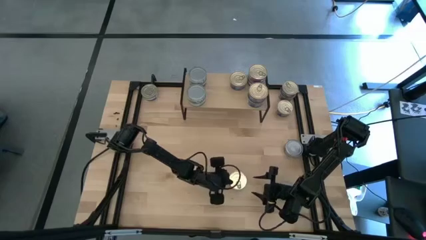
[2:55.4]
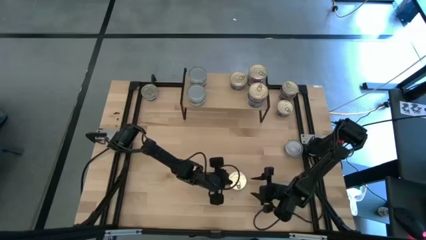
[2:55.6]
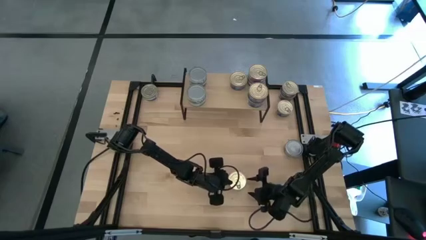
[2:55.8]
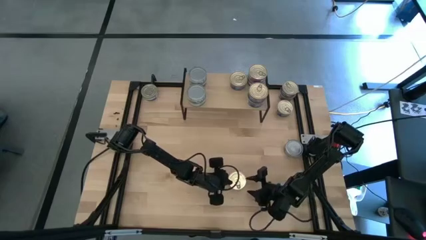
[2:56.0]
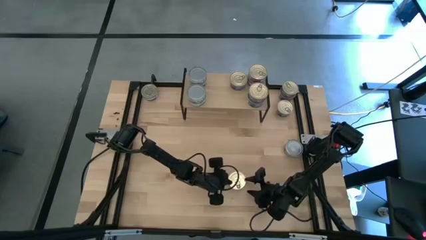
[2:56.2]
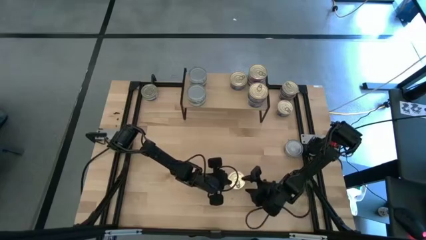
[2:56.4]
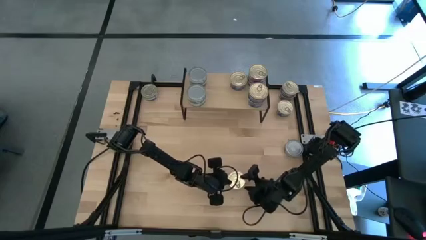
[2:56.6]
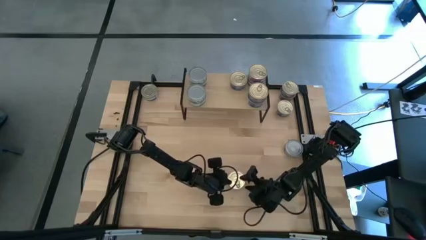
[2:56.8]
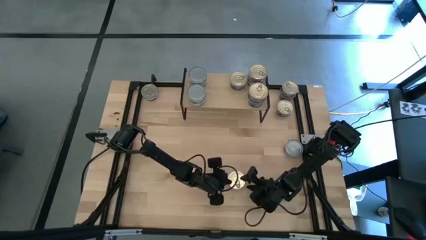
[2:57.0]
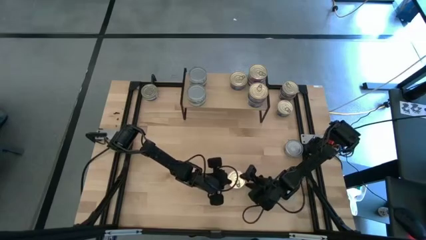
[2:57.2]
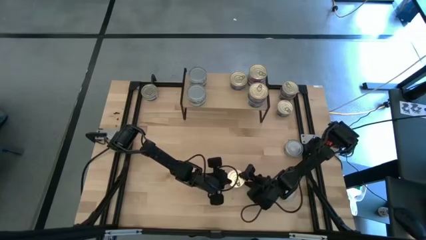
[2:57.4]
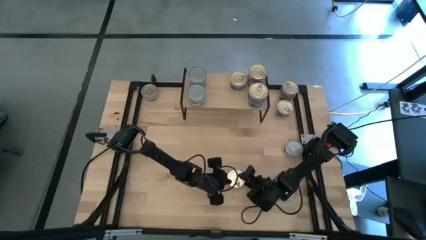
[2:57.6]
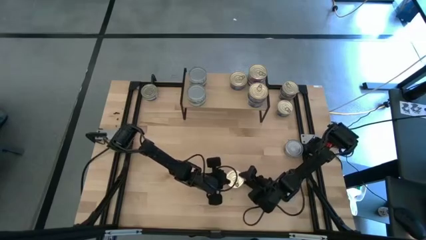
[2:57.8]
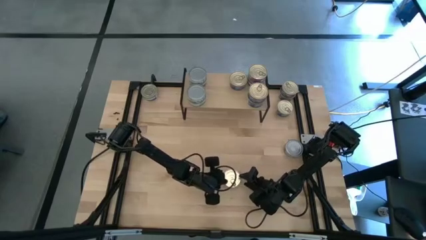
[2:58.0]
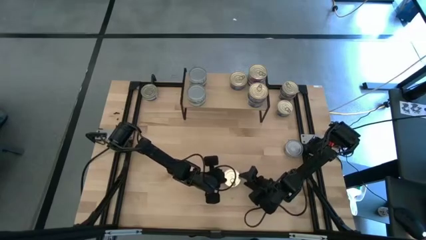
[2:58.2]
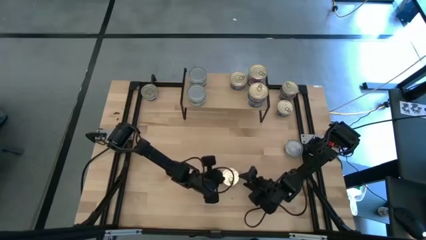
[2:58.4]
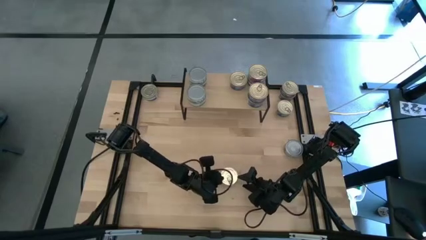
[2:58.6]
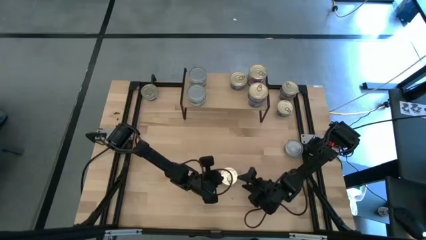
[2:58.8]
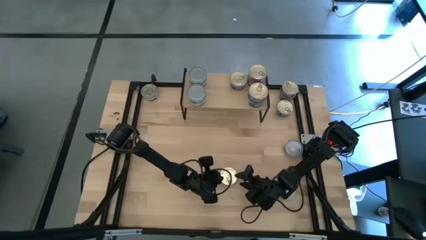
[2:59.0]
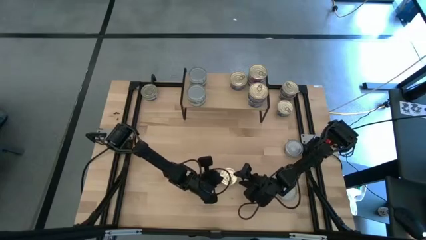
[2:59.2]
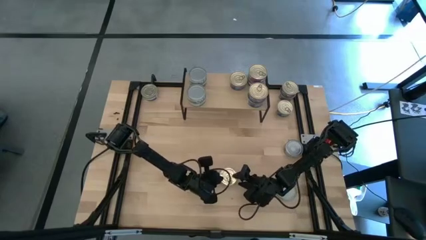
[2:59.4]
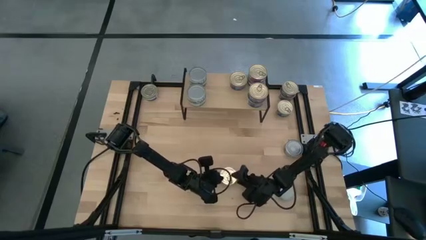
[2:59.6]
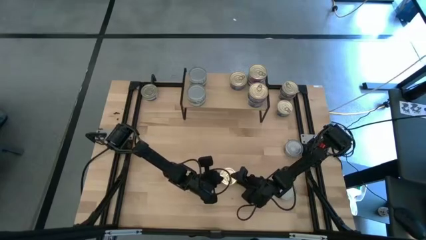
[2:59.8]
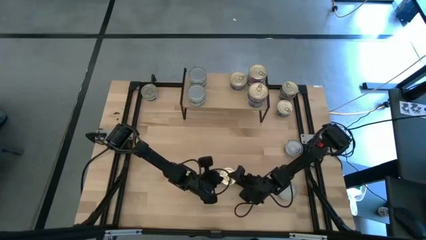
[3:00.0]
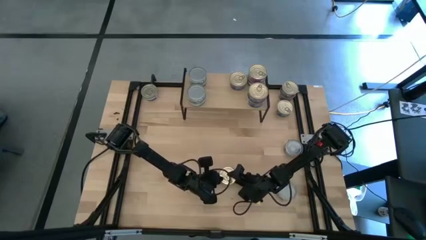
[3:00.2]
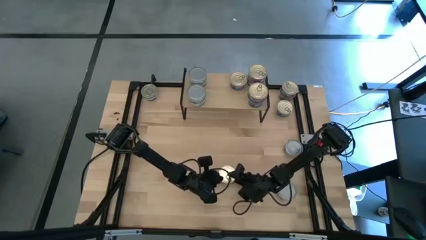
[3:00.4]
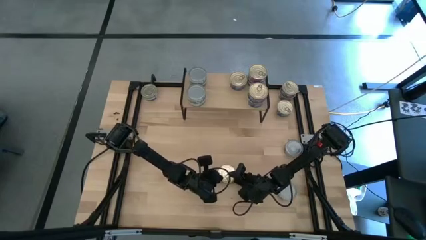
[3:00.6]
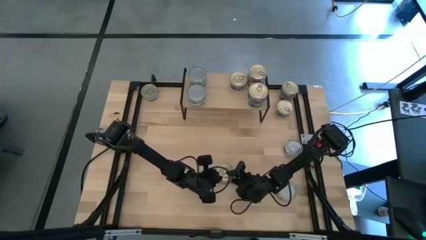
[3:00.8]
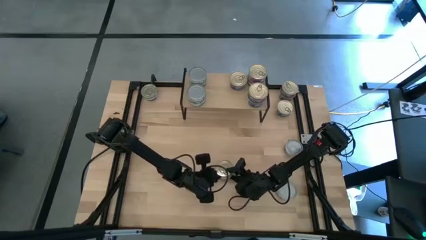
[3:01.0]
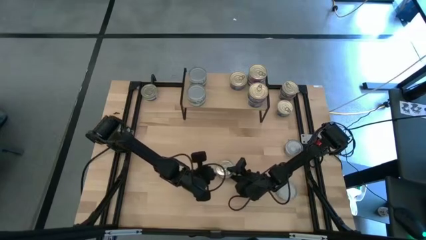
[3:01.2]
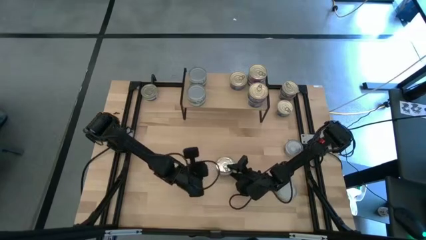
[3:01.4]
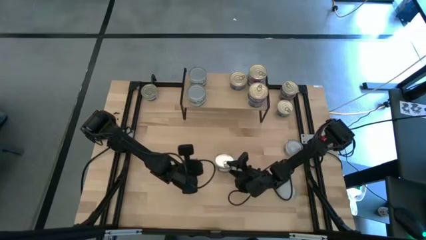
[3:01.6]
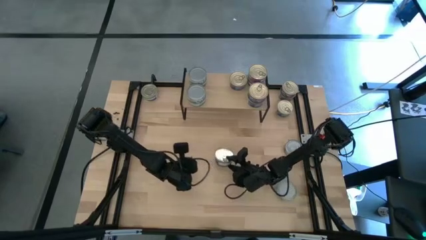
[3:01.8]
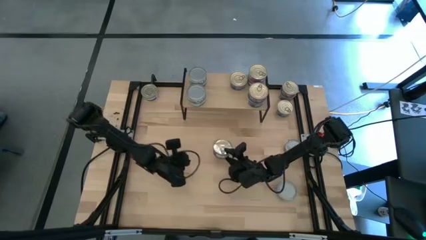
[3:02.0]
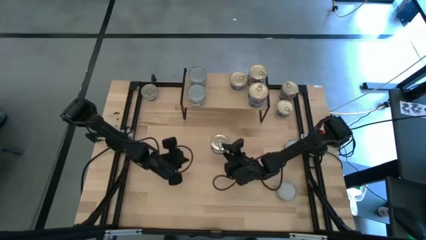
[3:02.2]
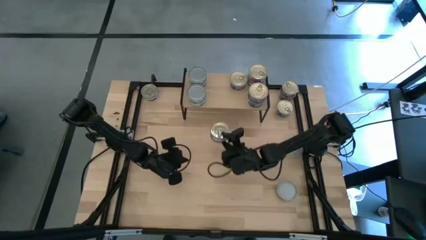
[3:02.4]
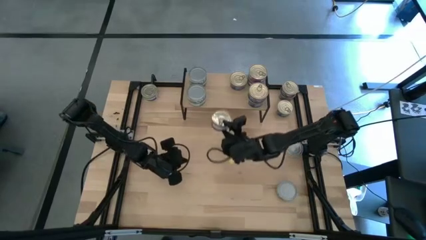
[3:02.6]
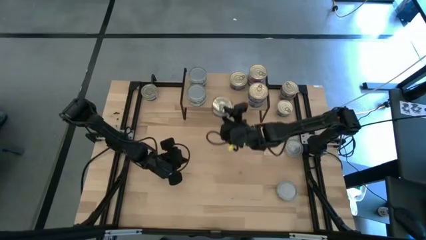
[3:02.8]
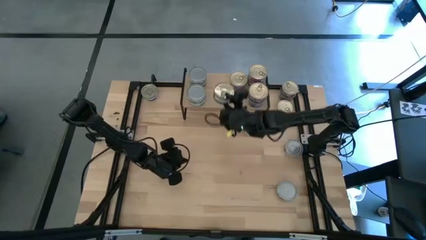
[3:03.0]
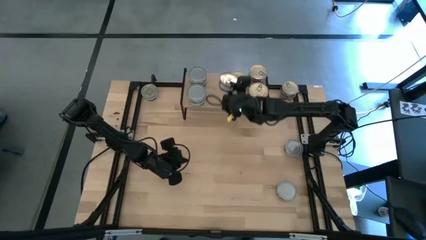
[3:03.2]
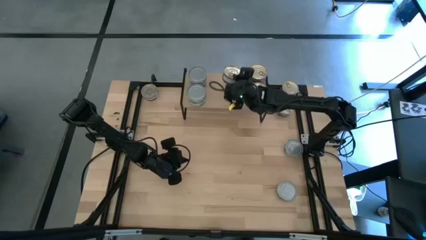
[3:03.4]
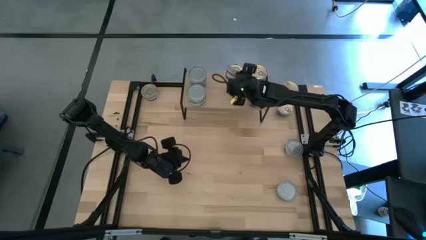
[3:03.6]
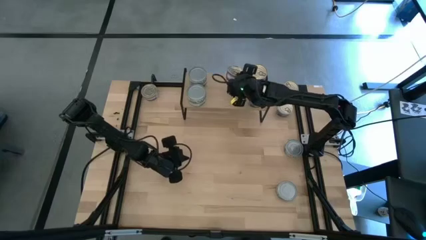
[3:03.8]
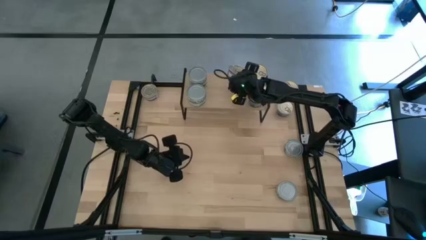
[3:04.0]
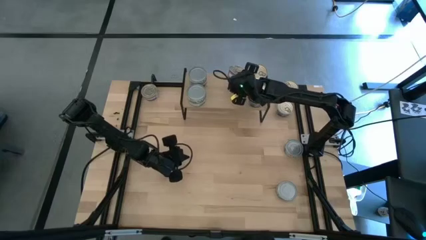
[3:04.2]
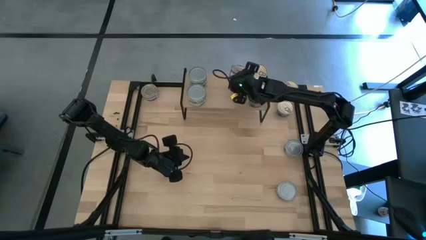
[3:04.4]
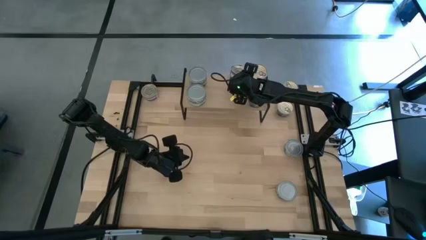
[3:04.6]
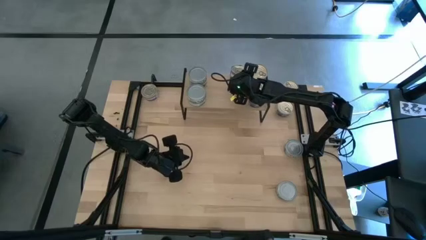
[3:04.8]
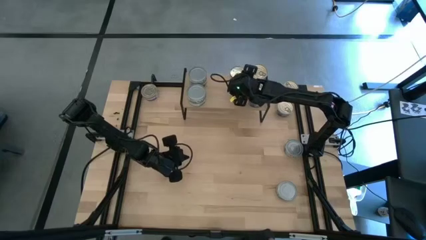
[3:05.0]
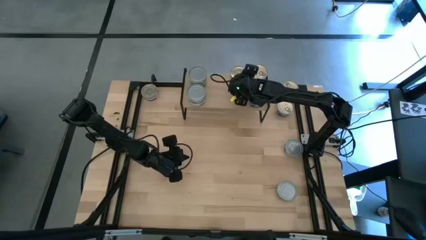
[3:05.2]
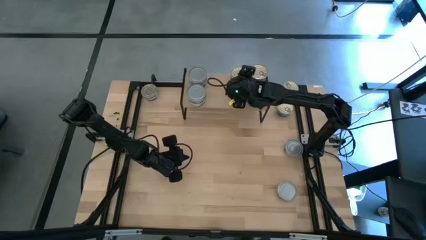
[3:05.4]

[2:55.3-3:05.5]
Task: Stack canned seafood by type on shelf
Stack the blue pink tuna can on top of the blue pink tuna can on the shelf

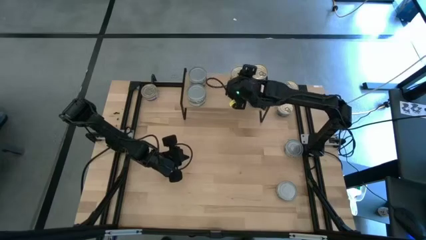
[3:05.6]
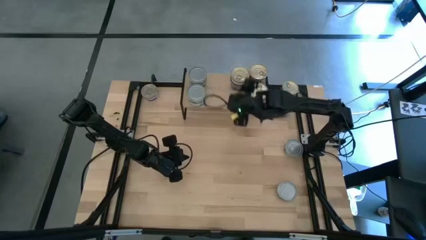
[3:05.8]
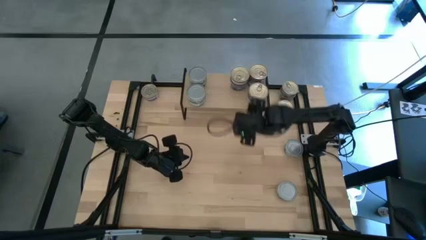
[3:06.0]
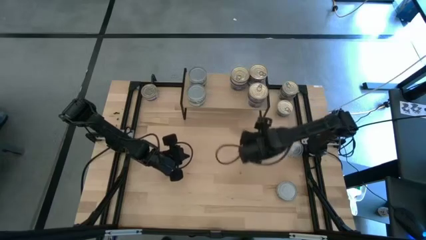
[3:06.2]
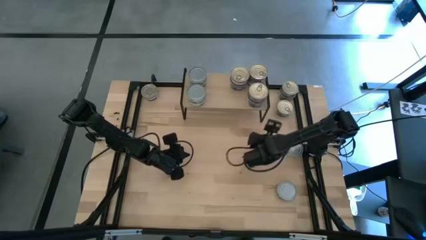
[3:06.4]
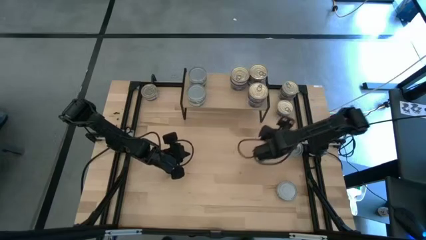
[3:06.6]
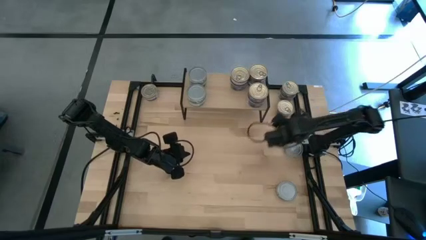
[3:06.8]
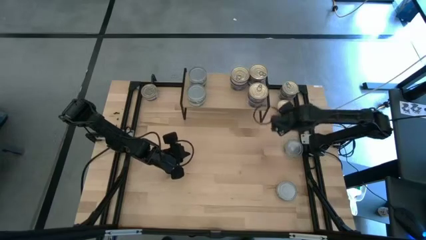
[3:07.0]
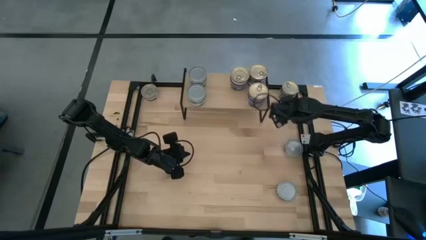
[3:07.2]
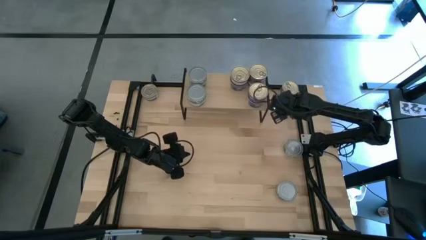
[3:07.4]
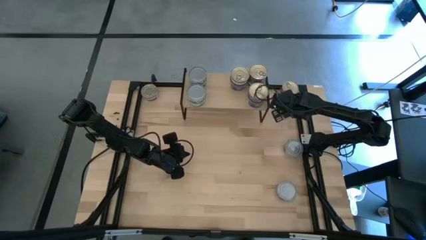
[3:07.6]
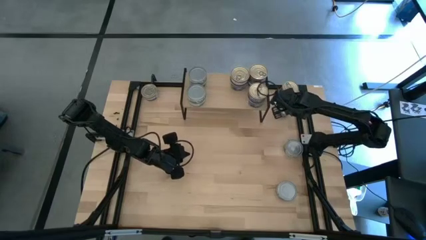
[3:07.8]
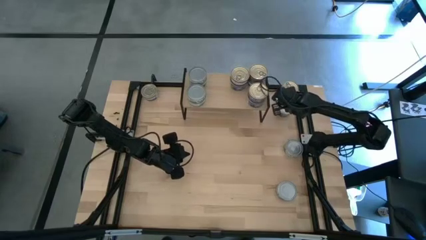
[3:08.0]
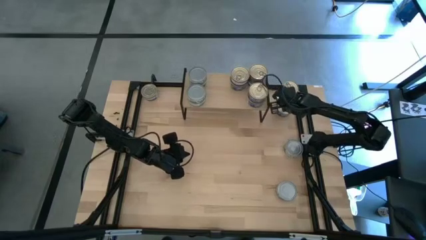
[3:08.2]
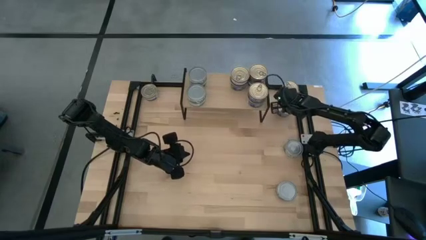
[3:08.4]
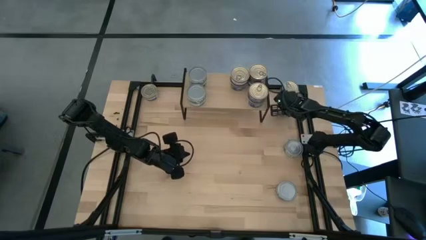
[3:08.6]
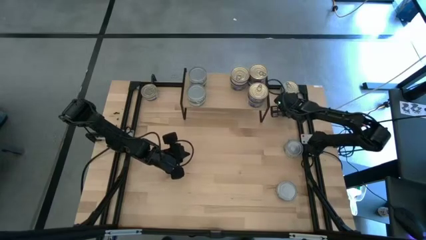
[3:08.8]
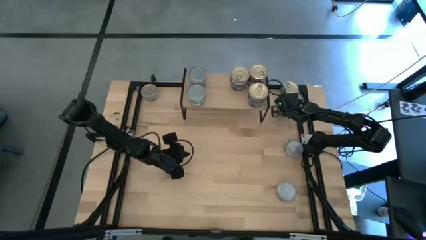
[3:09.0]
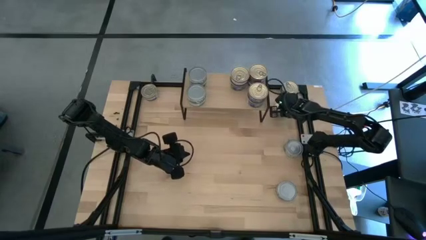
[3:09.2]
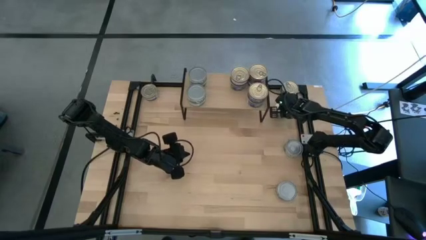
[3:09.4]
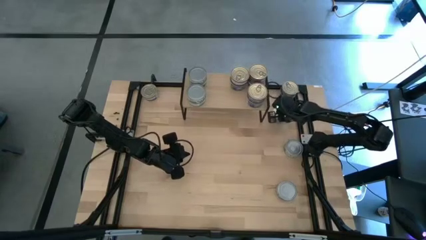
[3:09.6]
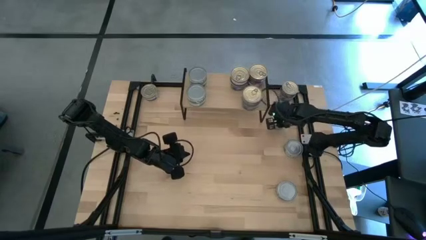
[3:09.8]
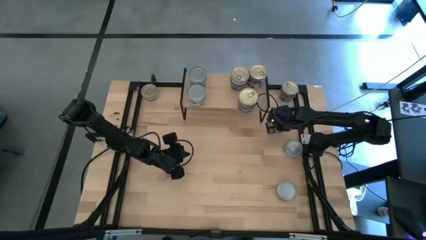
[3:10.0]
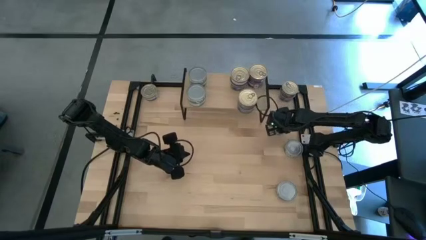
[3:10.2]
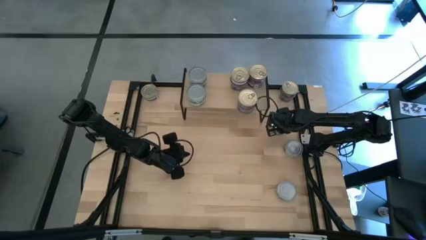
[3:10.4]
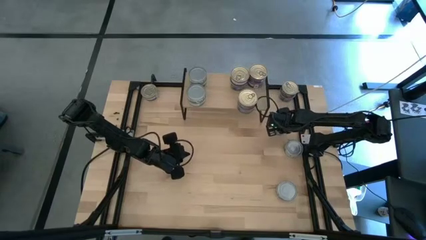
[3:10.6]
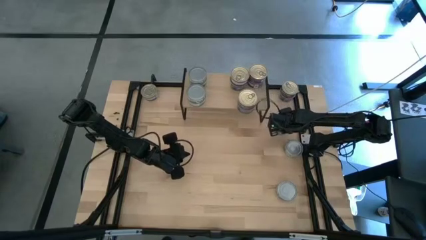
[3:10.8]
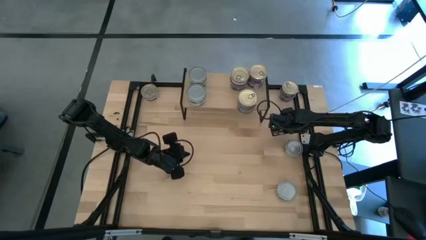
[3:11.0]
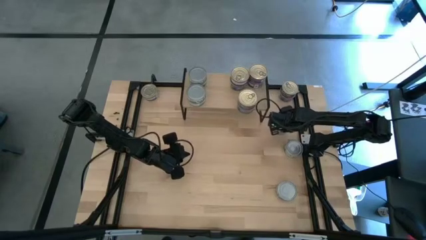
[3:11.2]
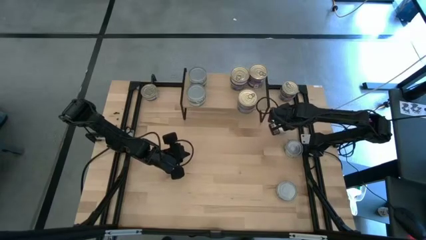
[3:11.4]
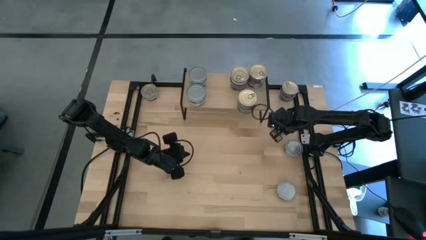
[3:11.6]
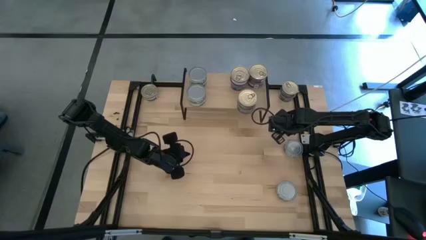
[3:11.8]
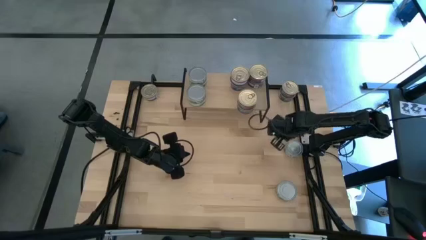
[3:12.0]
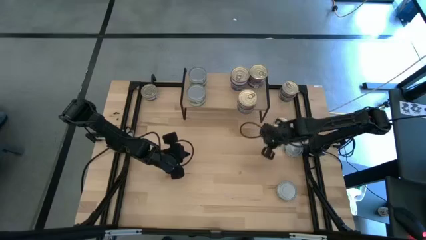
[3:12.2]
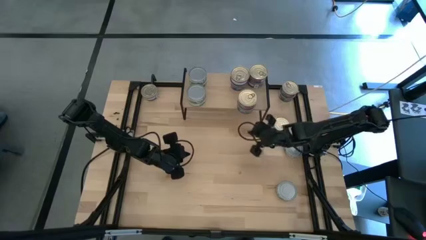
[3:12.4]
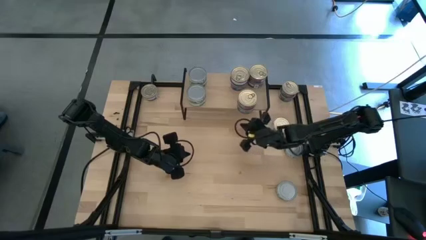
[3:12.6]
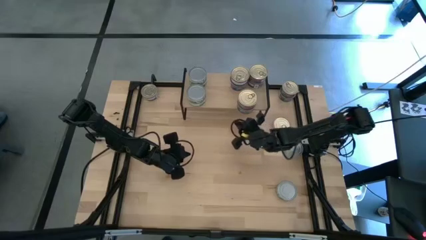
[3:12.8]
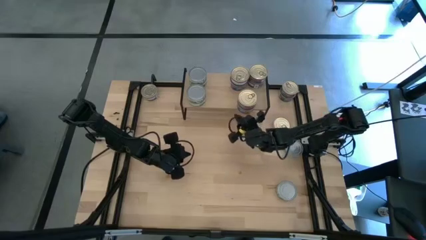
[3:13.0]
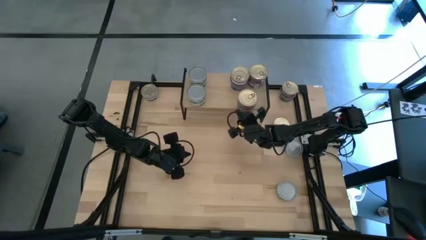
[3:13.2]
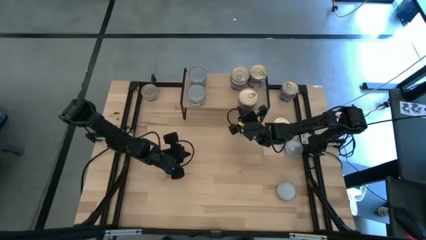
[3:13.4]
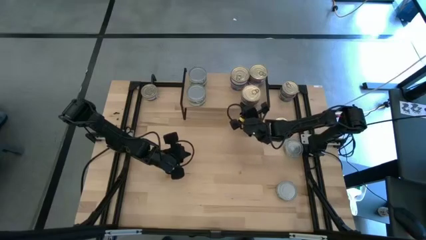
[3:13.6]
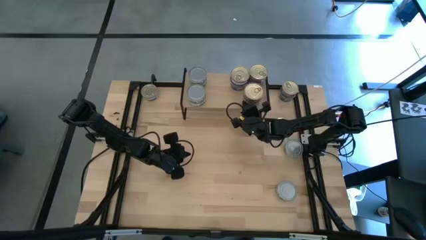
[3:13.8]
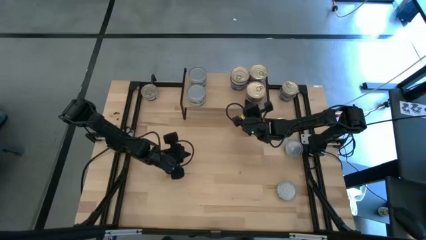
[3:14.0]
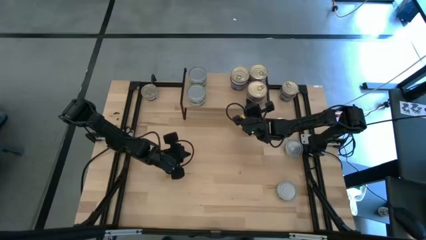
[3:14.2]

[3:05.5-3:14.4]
Adjust the blue pink tuna cans
